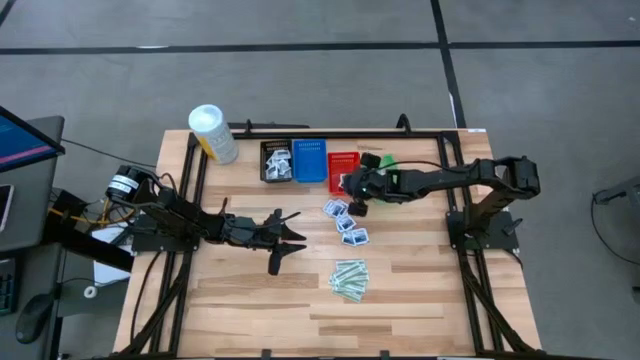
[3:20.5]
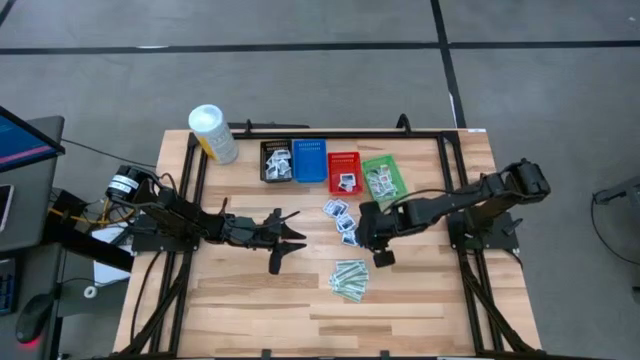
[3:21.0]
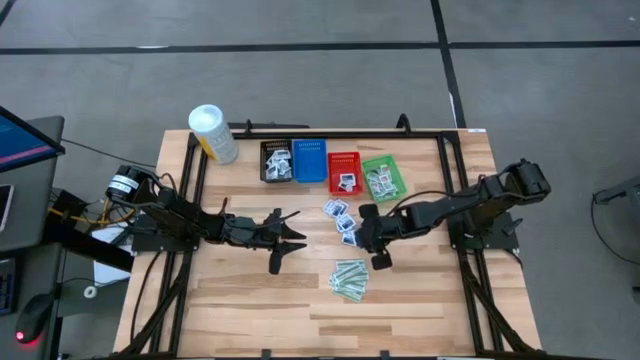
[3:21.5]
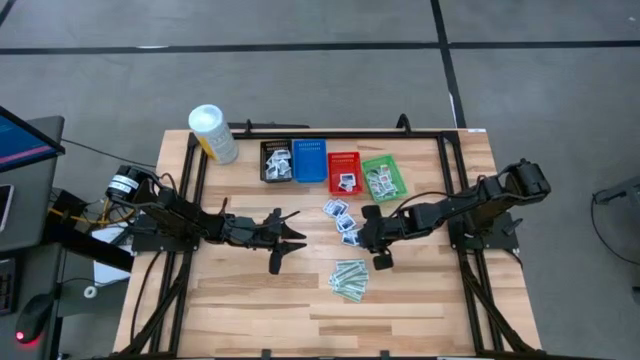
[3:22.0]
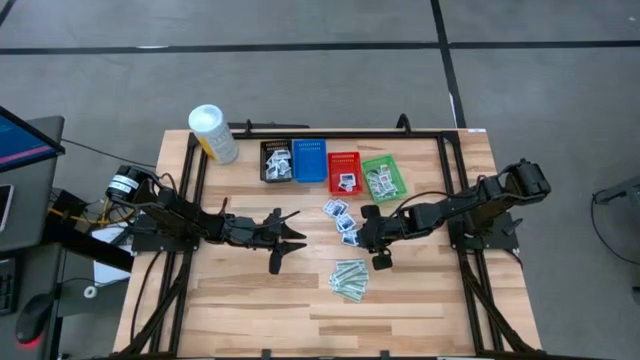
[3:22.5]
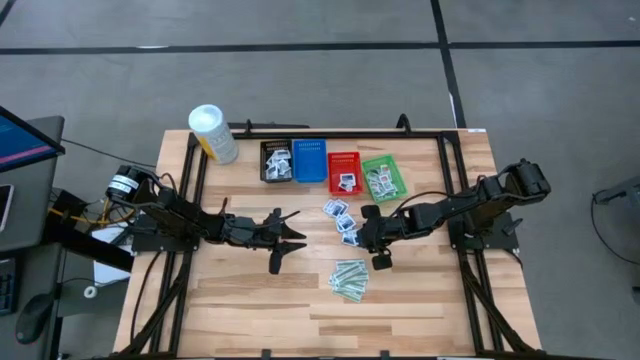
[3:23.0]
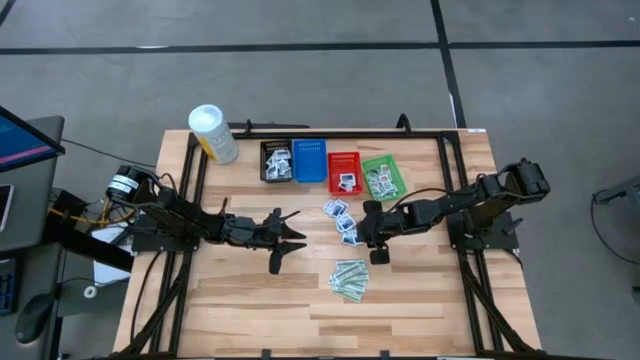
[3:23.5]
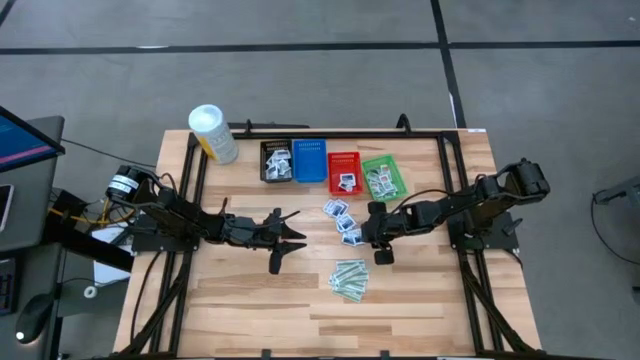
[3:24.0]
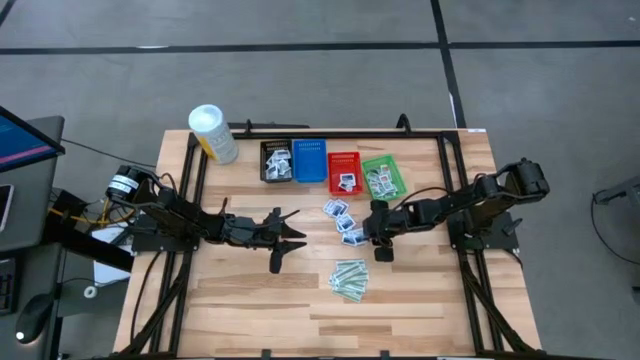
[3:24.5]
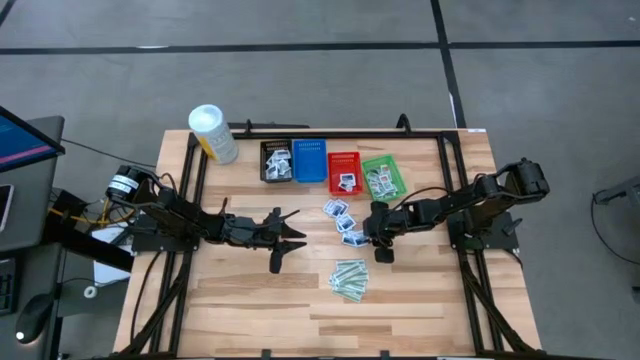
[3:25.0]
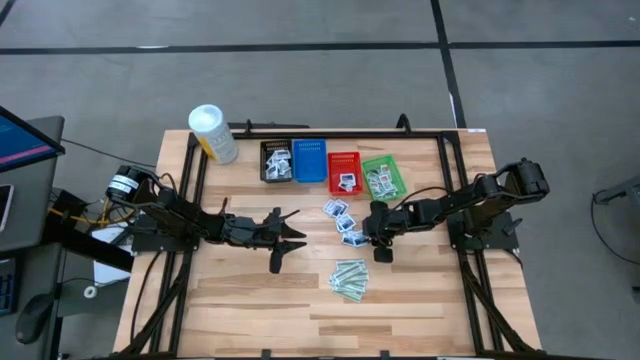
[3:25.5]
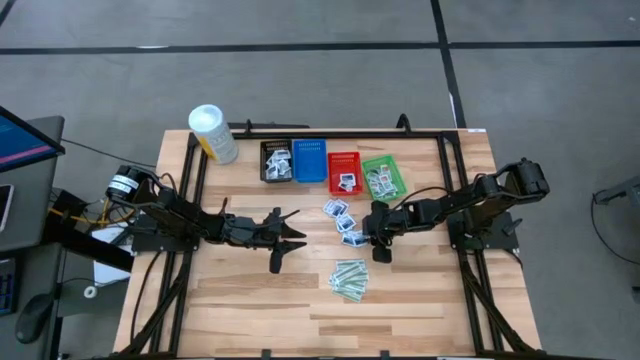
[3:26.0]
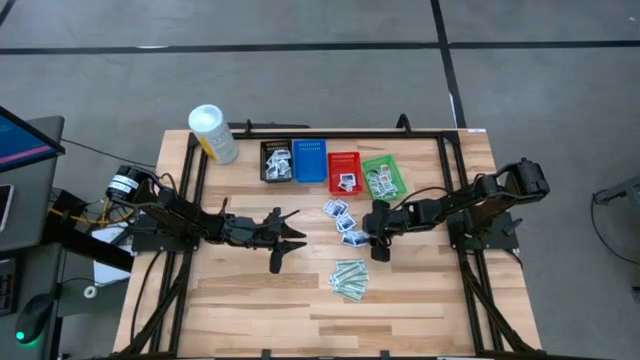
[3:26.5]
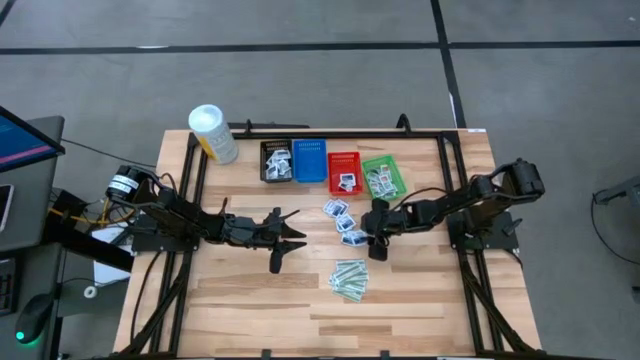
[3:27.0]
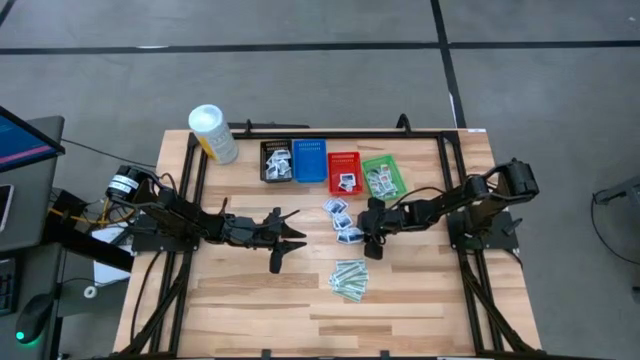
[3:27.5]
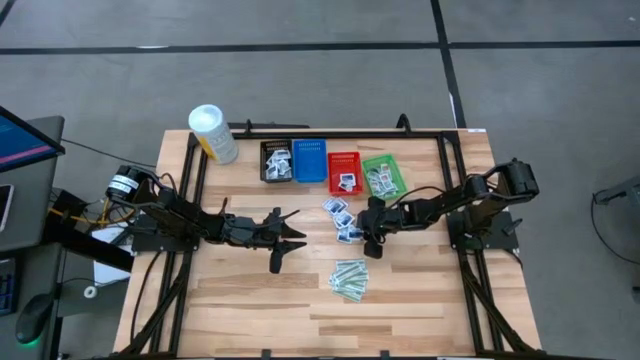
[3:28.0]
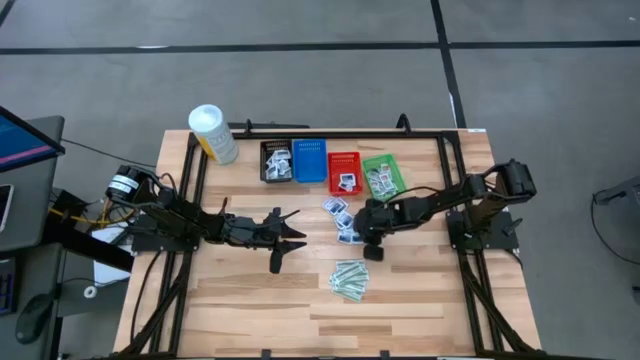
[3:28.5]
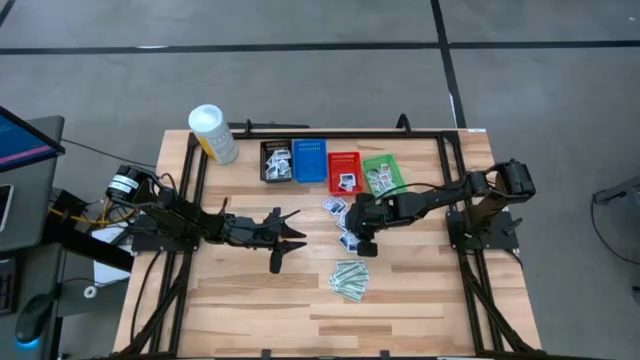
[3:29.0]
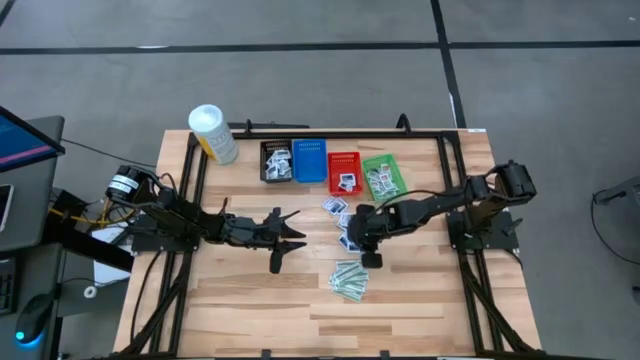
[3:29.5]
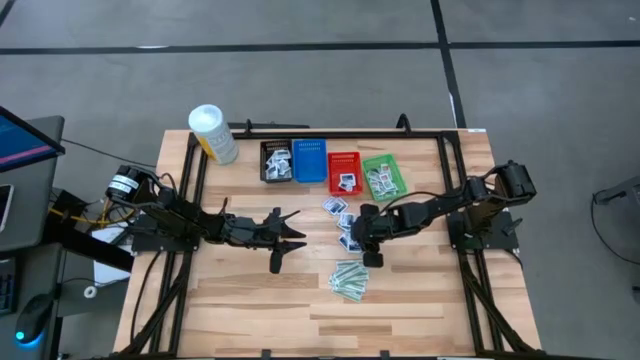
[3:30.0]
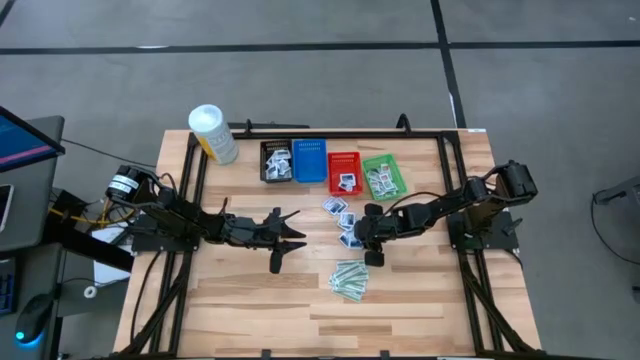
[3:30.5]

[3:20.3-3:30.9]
Task: Pick & Place First Aid Supplies
Put the blue pad into the red bin

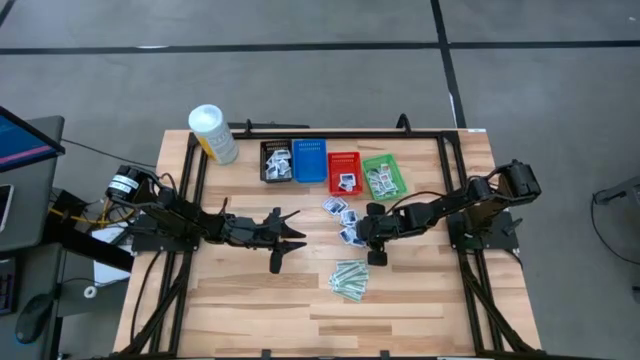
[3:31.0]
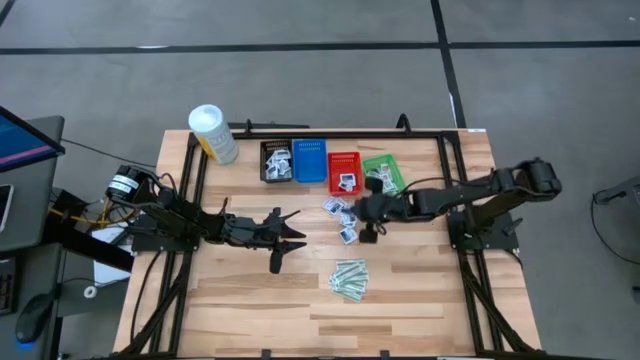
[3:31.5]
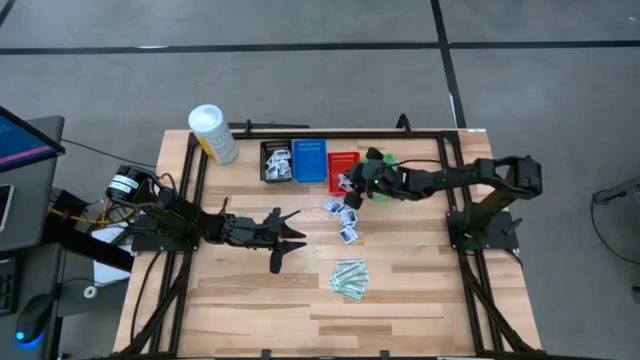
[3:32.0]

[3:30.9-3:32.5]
Put the blue pad into the red bin

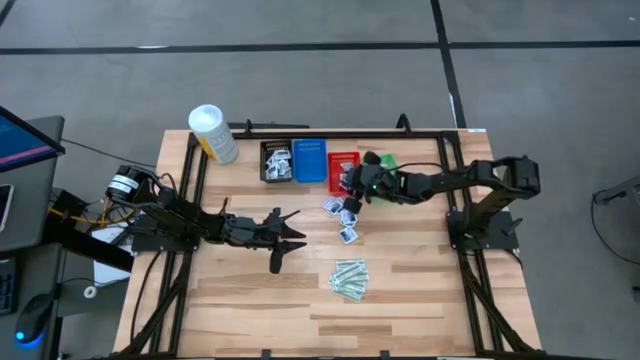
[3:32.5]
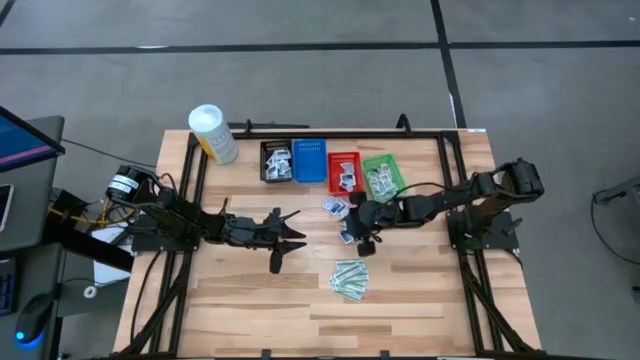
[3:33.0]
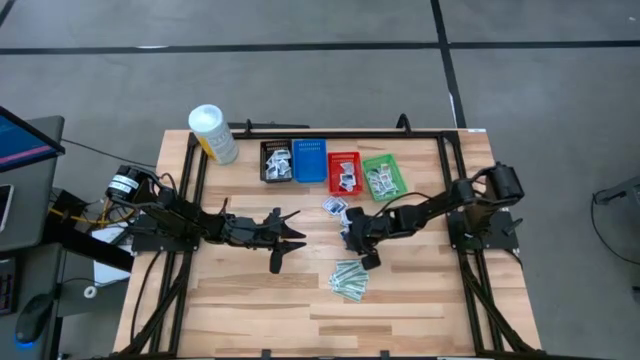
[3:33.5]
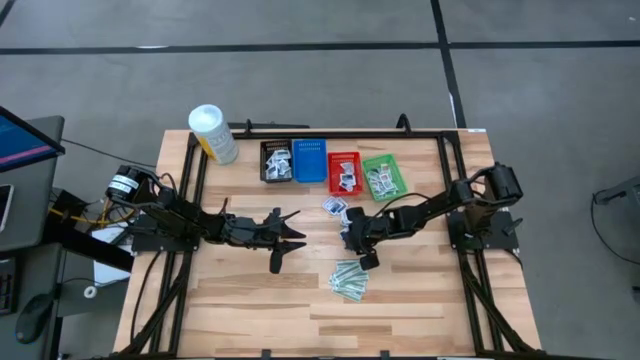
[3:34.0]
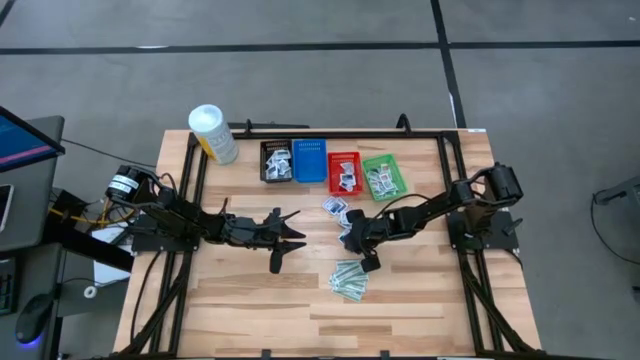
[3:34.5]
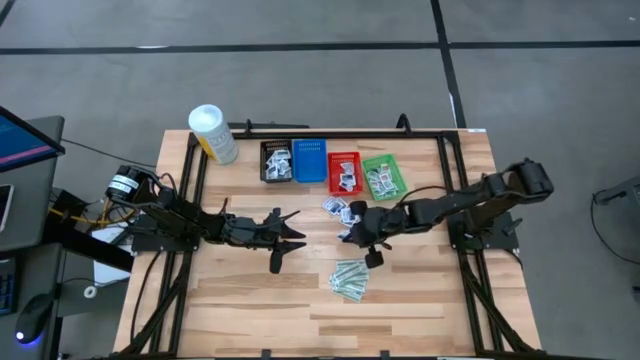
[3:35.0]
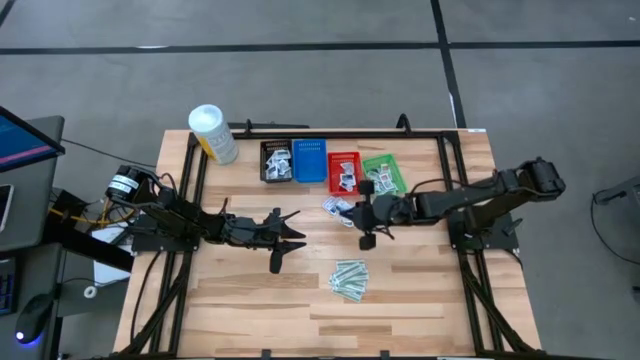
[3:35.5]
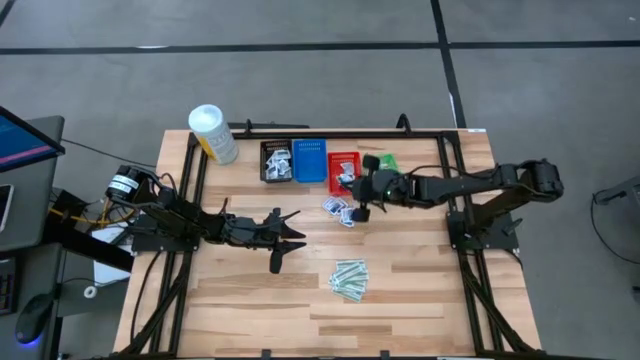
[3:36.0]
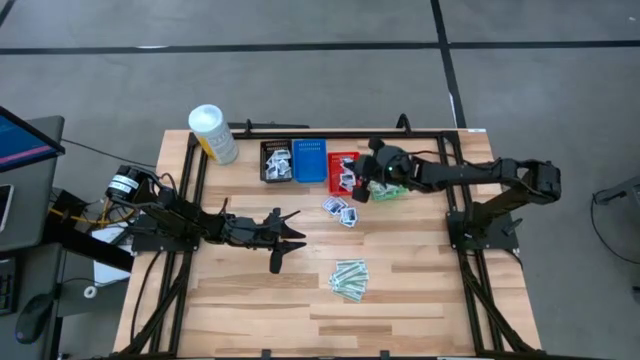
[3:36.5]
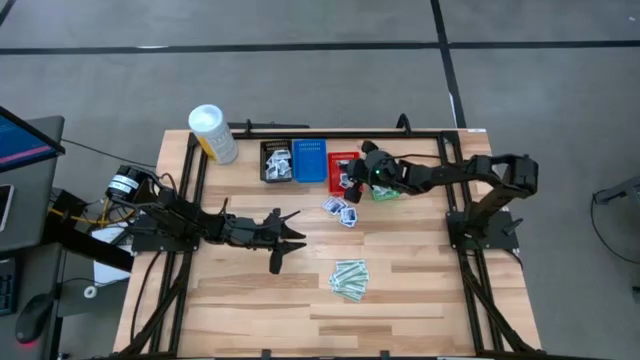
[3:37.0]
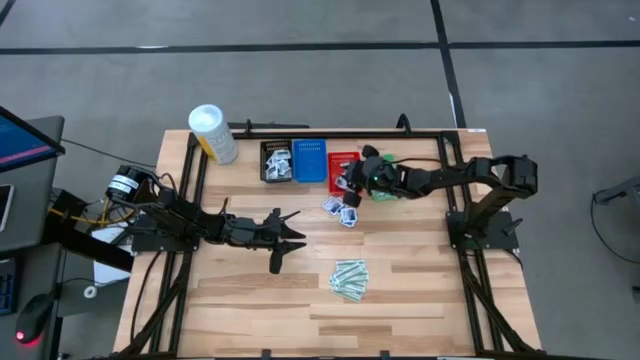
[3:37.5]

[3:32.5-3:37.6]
Put the blue pad into the red bin
